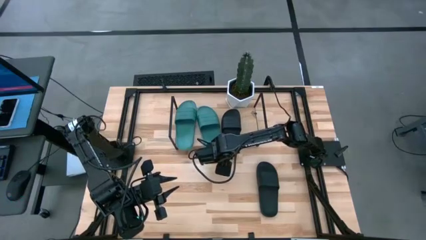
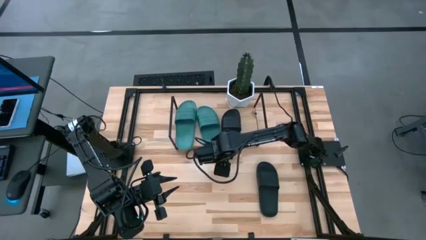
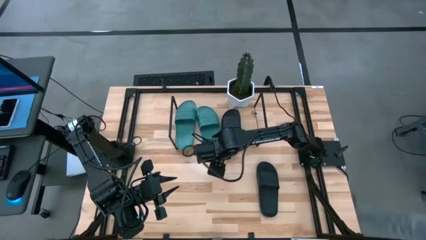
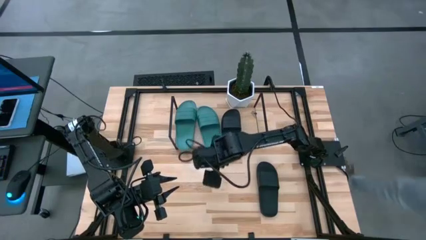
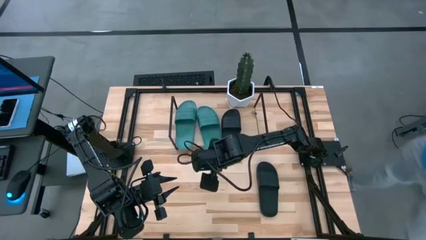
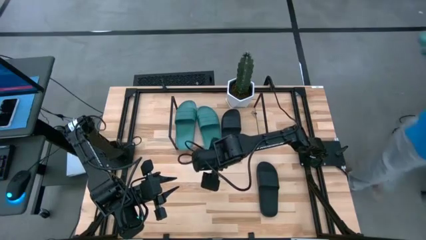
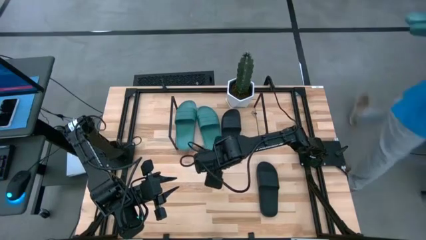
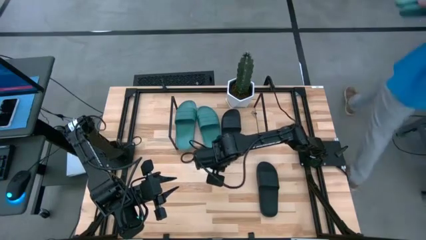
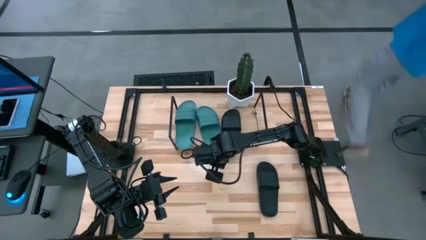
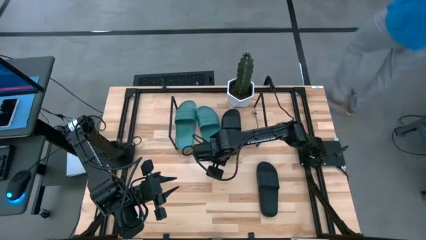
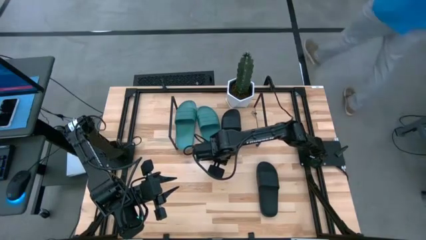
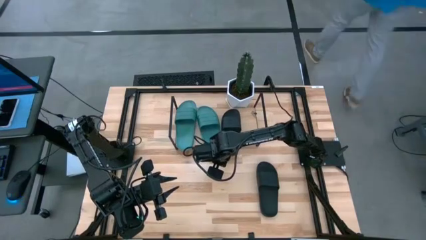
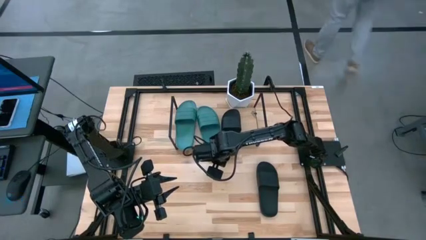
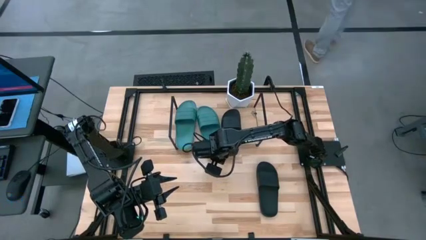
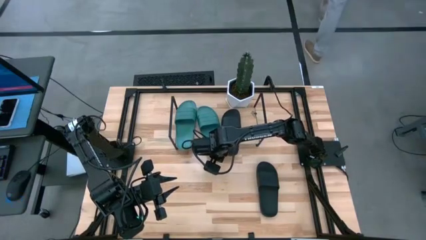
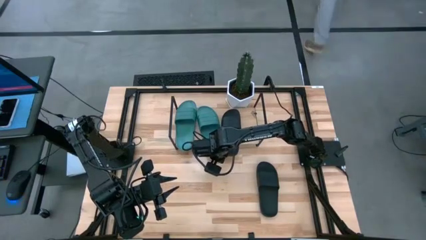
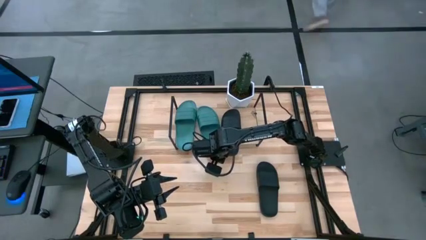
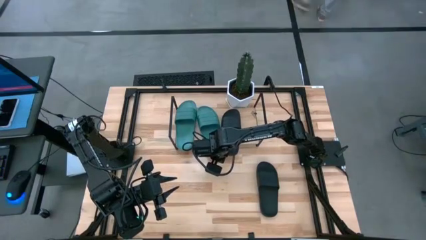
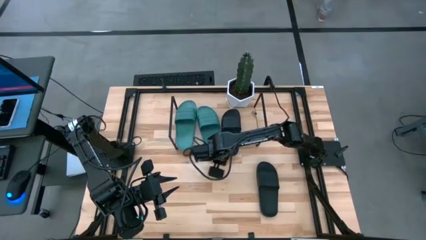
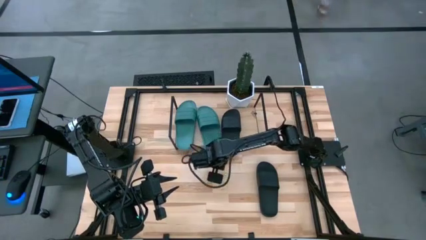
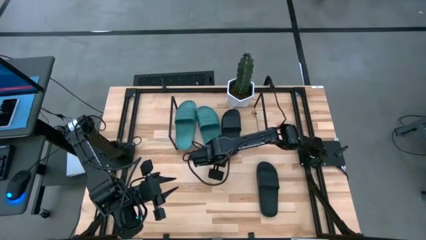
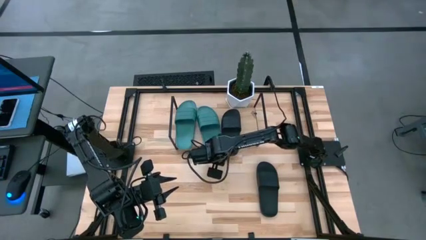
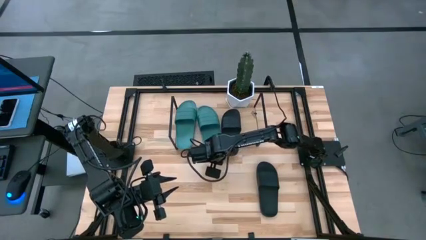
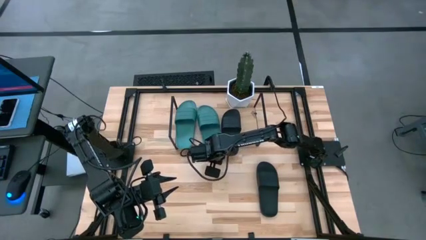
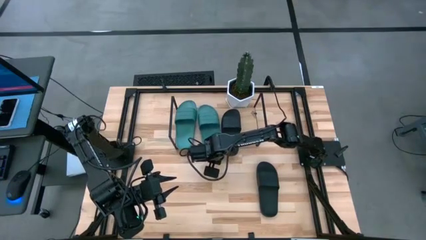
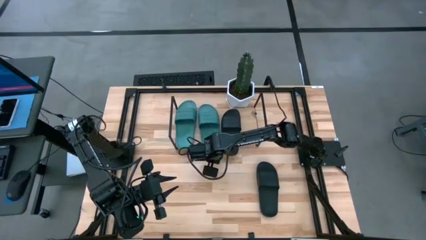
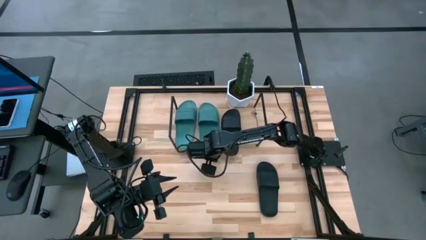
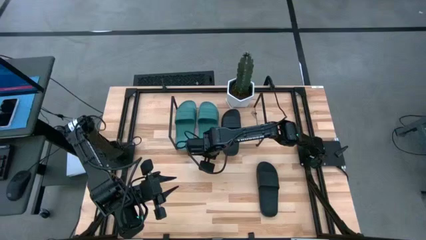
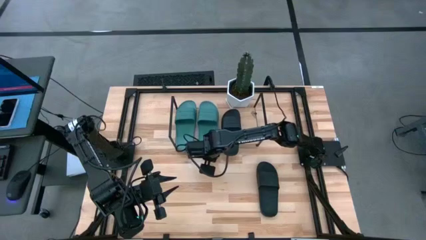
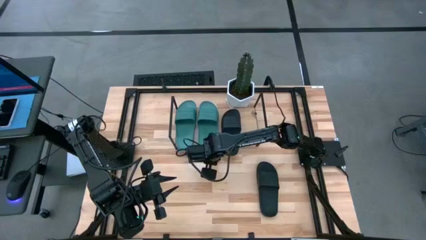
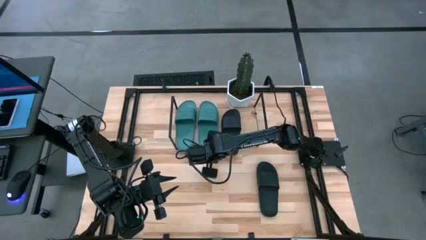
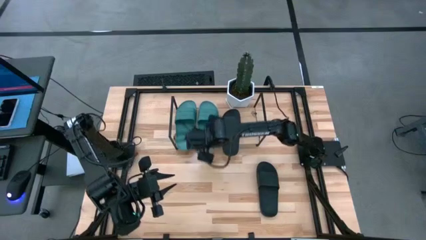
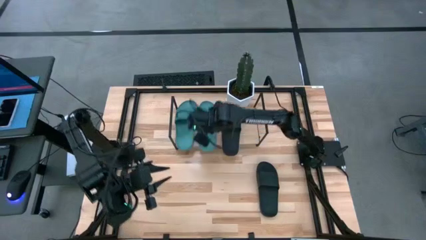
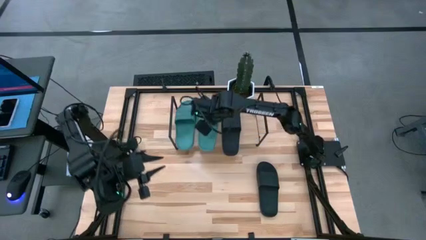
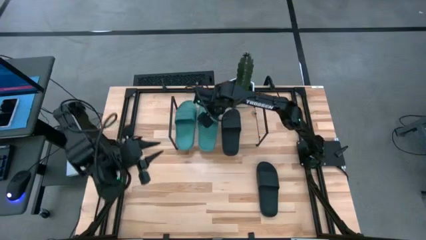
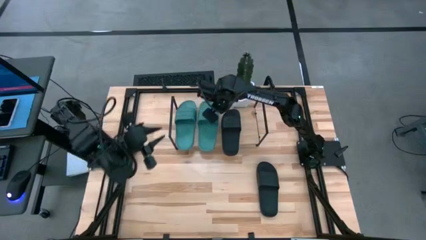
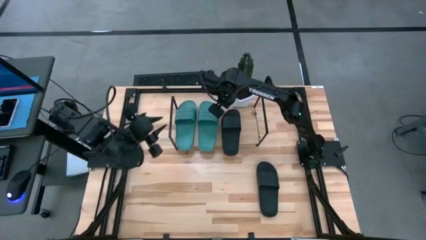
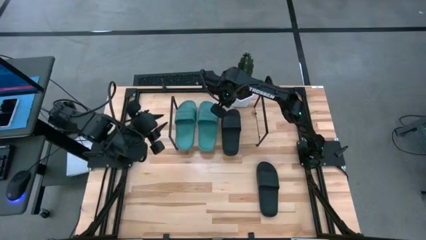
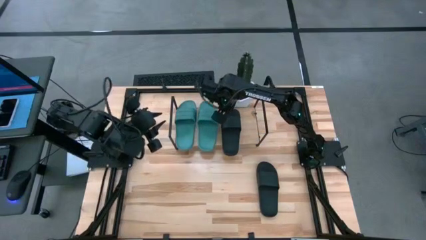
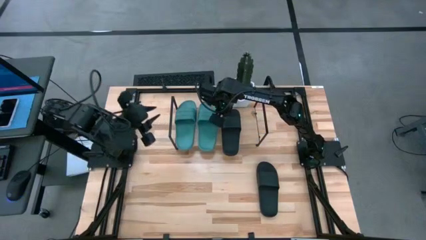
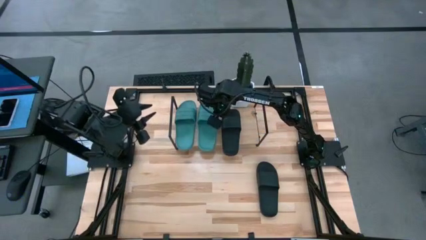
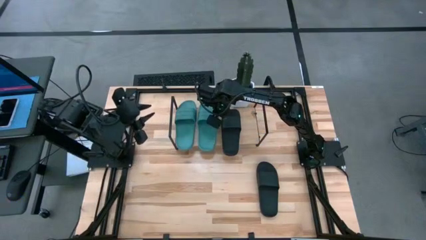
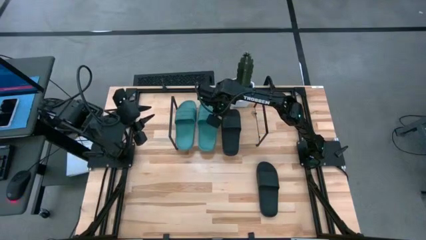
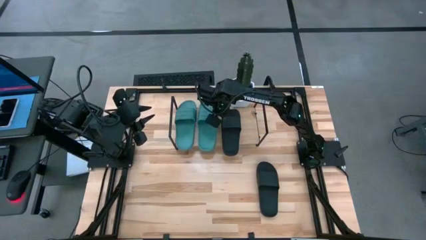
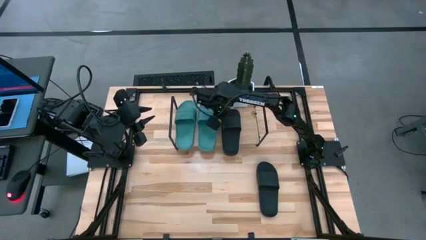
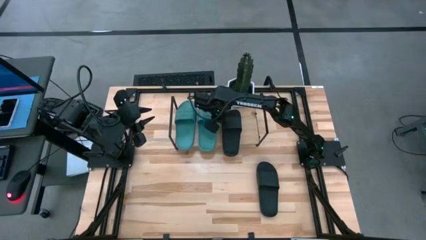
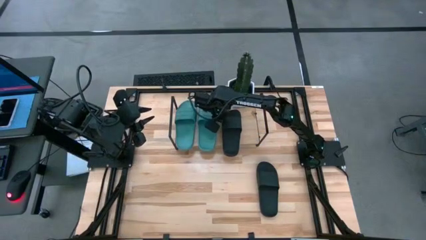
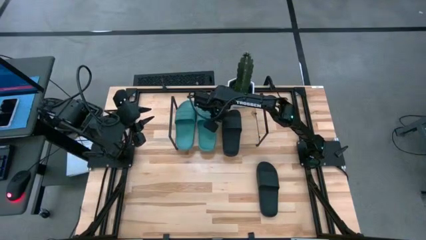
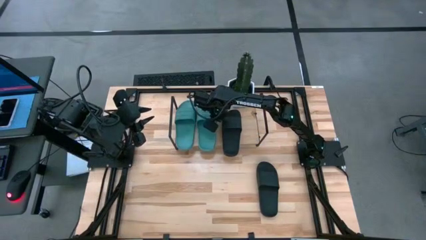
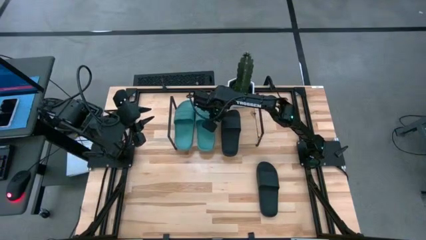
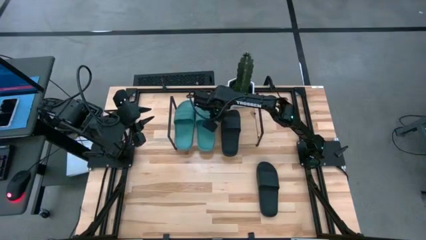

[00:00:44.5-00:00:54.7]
Task: Pick and place slides into the shelf
Adjust the right light blue slipper on the shelf

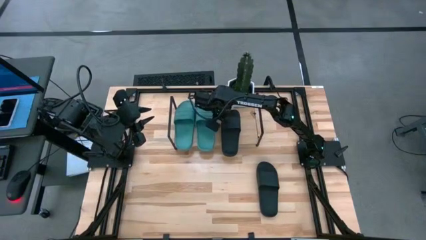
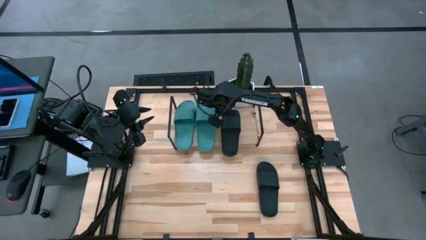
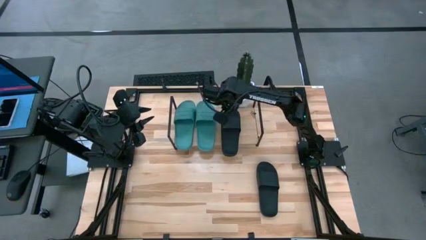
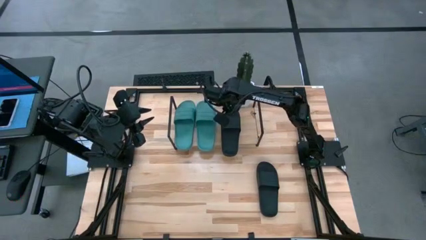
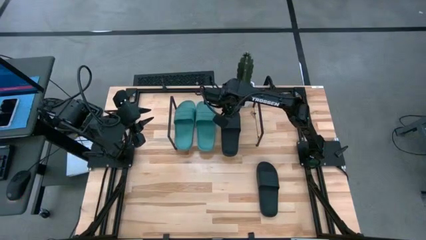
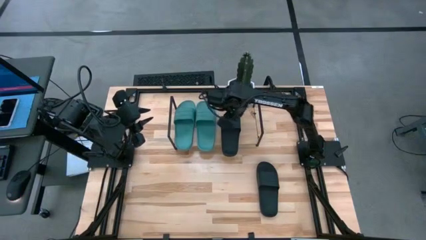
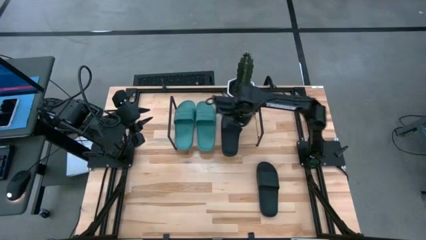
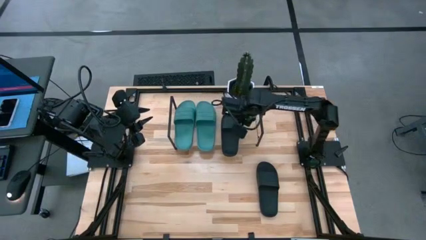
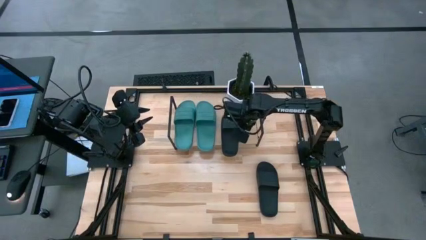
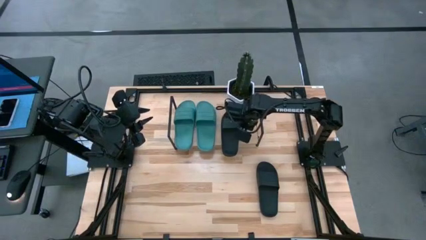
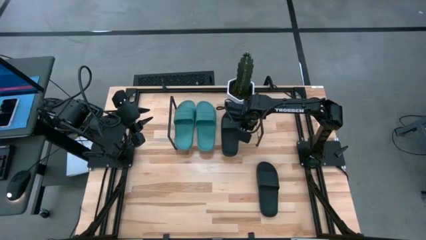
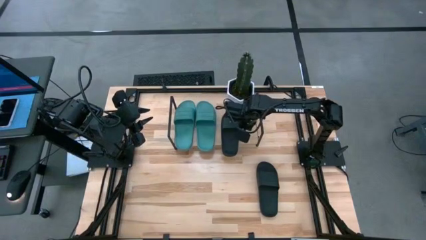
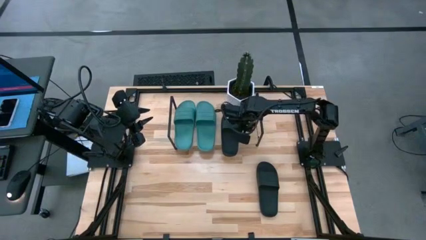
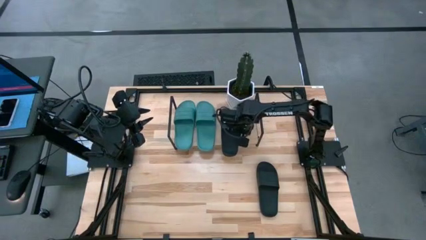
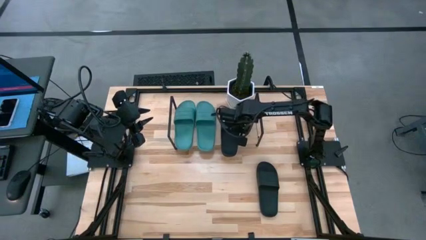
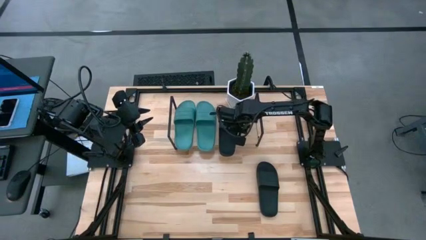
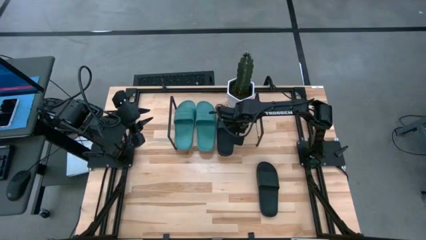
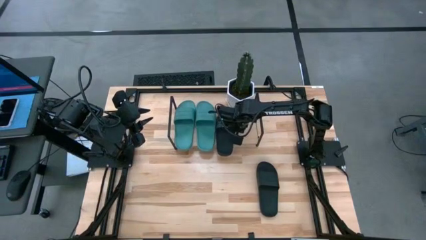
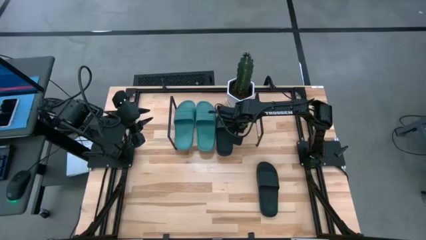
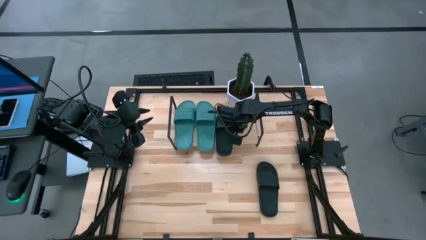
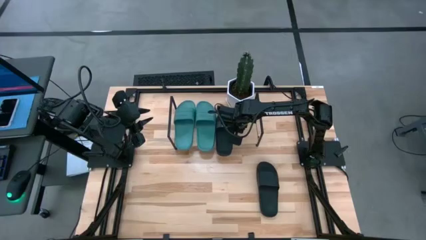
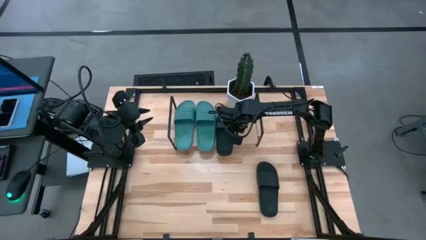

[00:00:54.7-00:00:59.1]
Adjust the black slipper on the shelf
